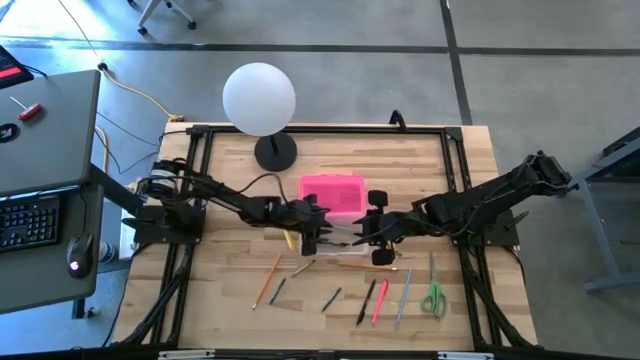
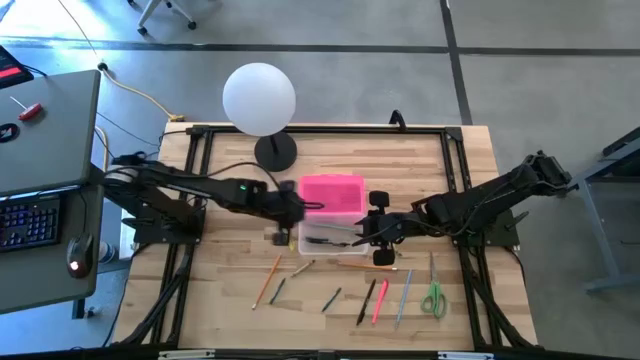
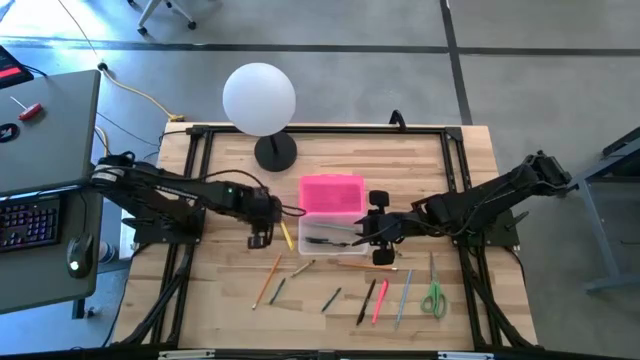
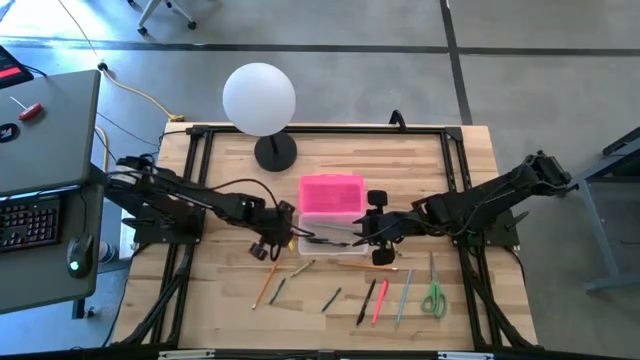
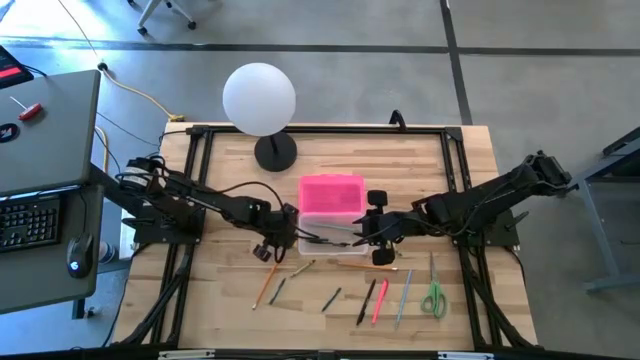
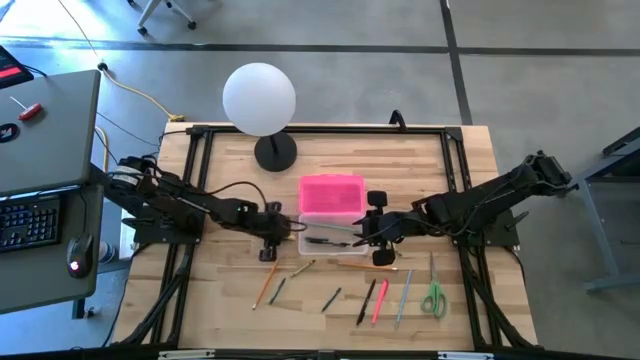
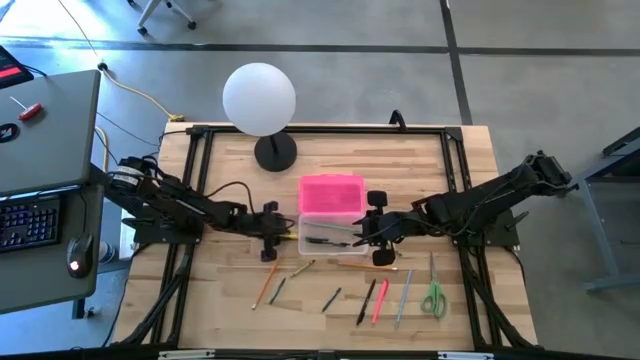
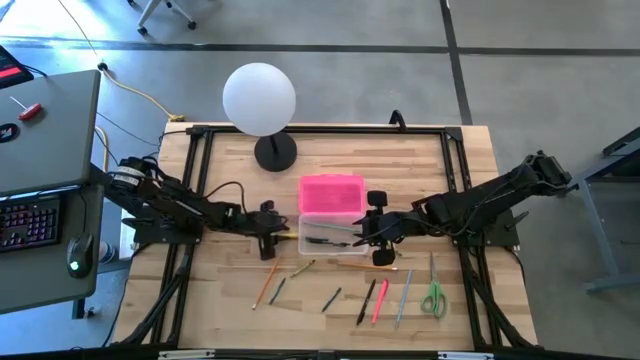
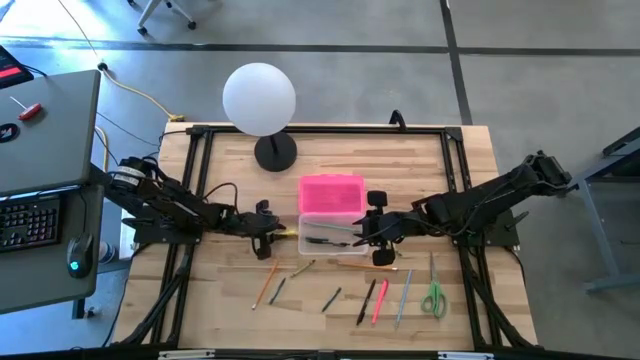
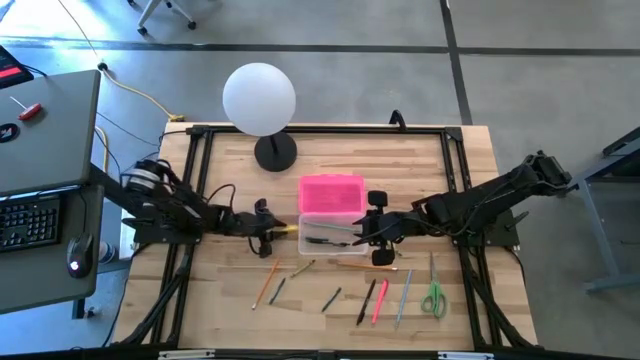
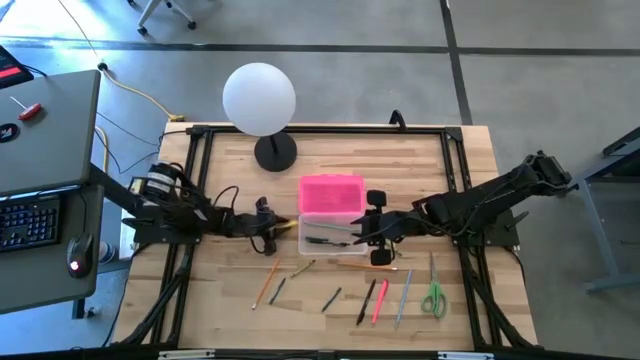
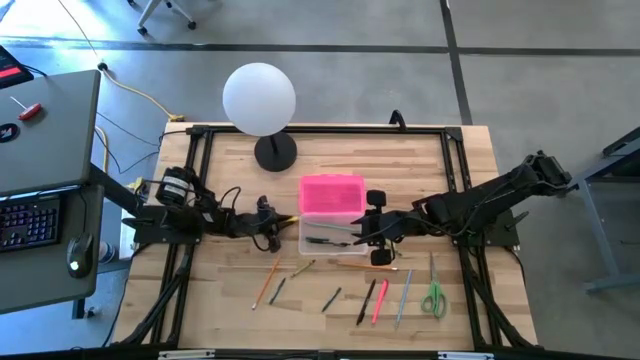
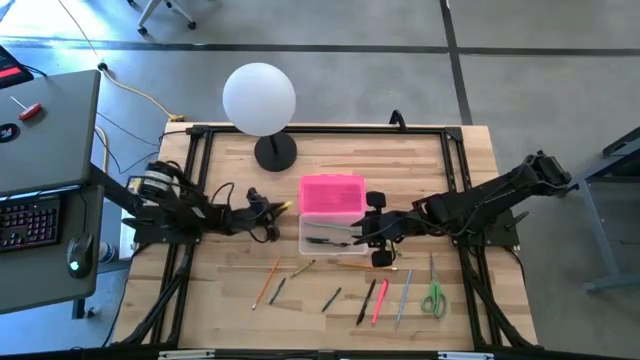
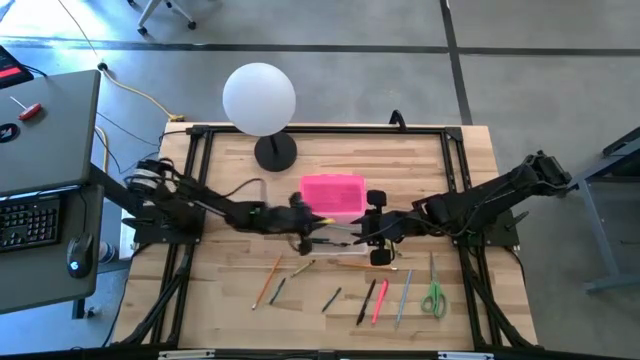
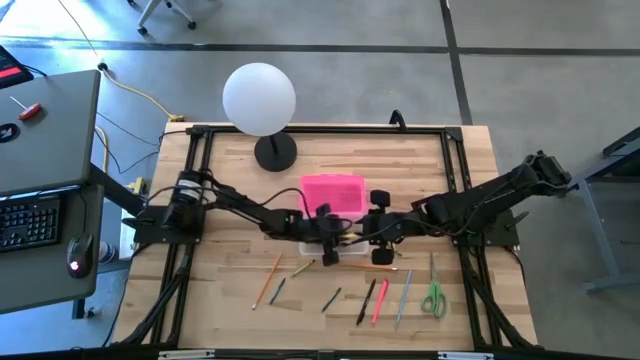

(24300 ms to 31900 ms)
Task: Pick & place school supplies into a supply box
Put the yellow pen into the pink supply box

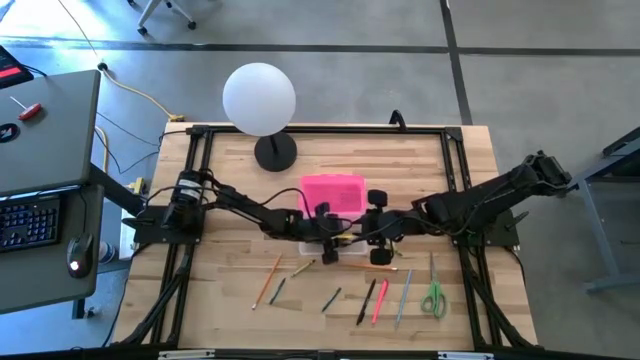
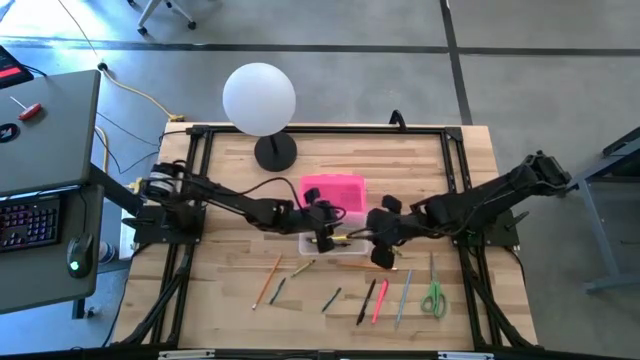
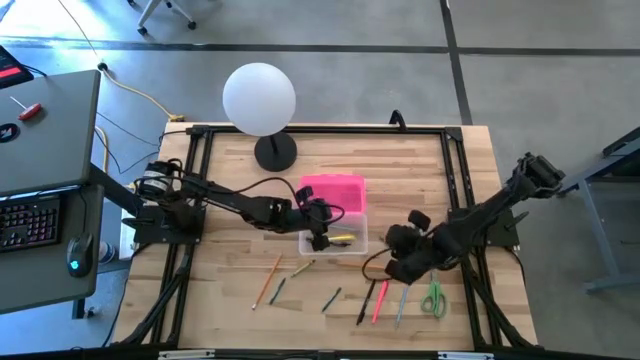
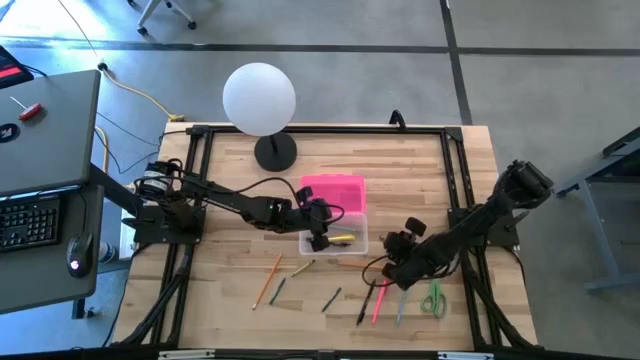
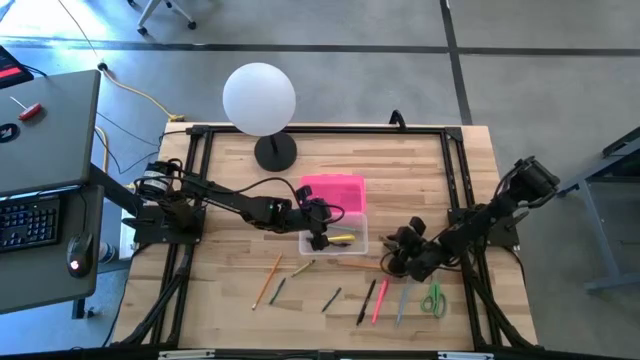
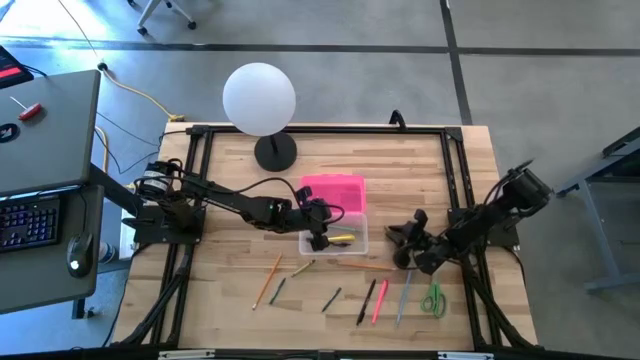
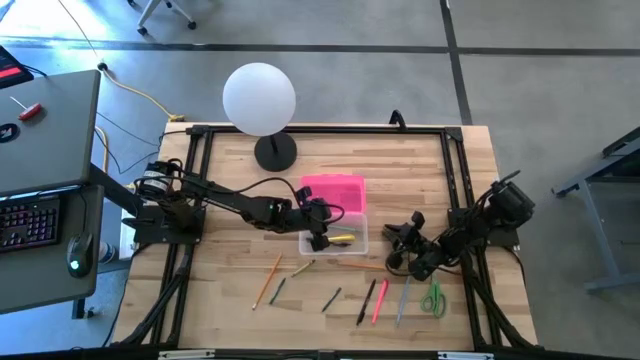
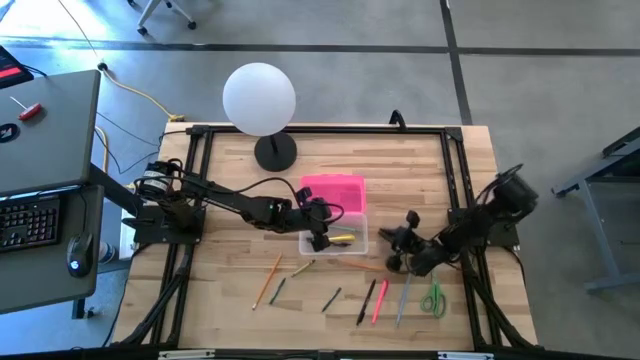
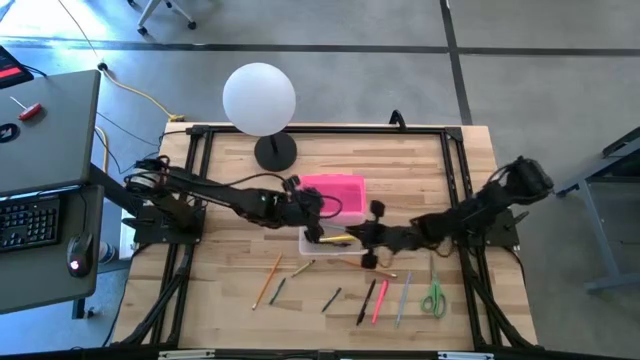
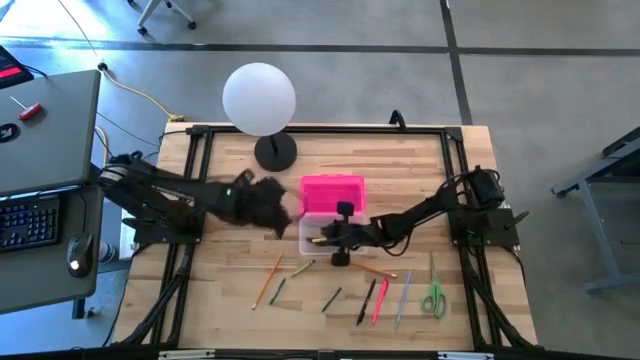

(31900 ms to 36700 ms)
Put the light green crayon into the pink supply box

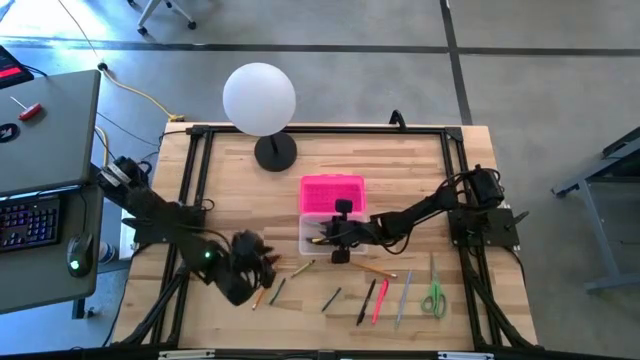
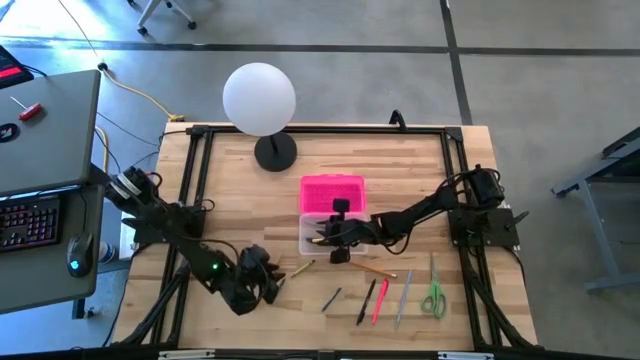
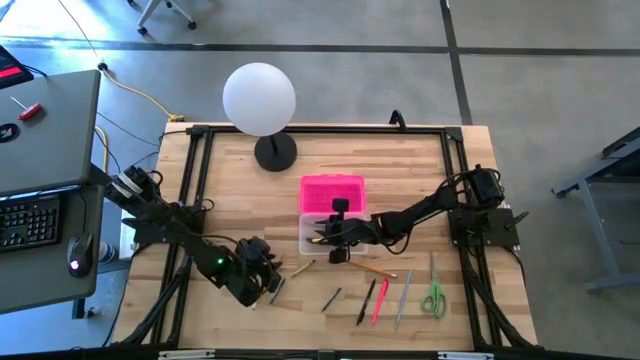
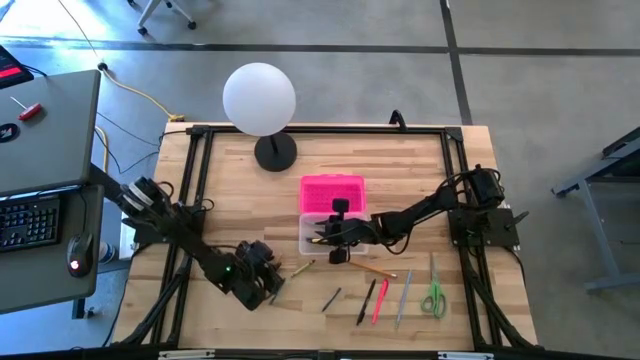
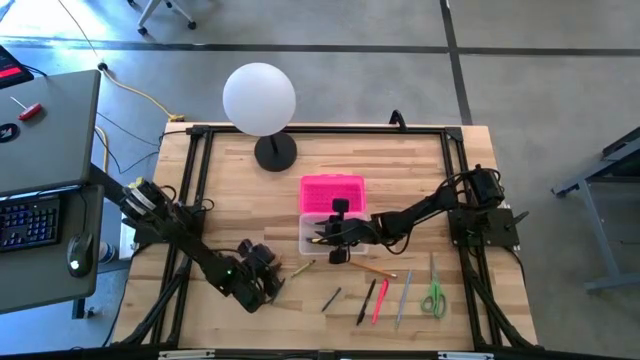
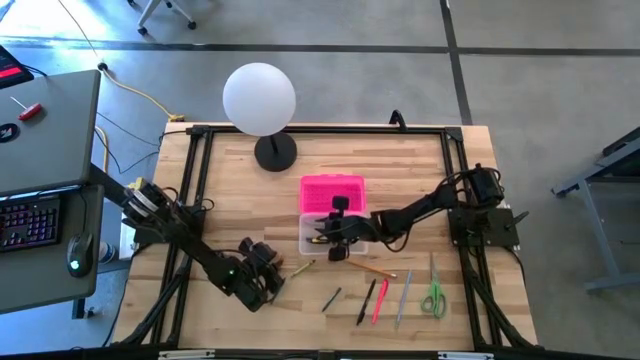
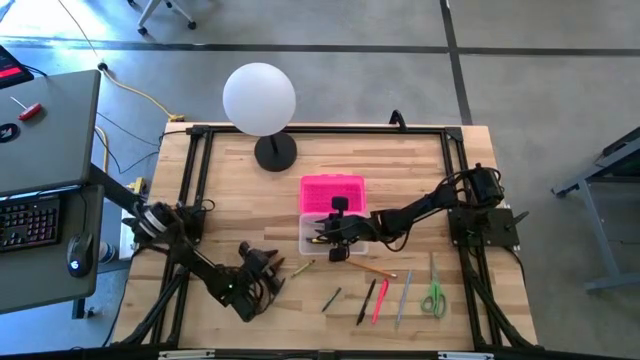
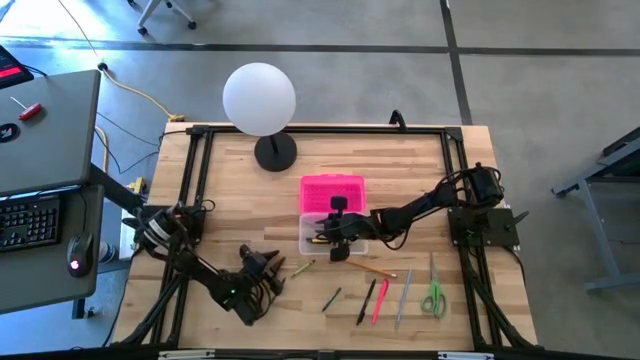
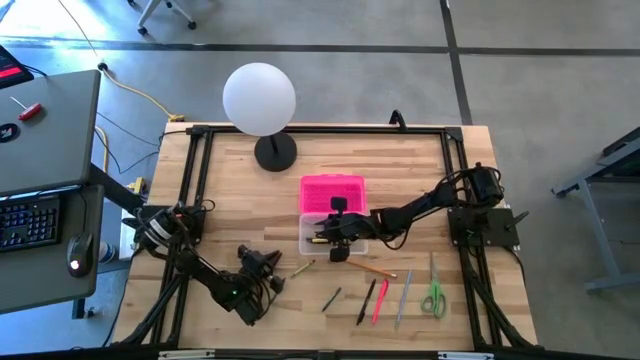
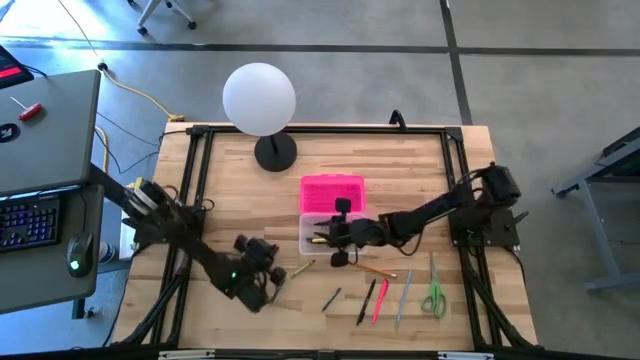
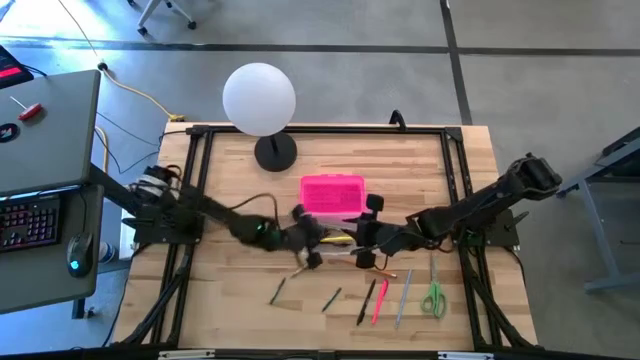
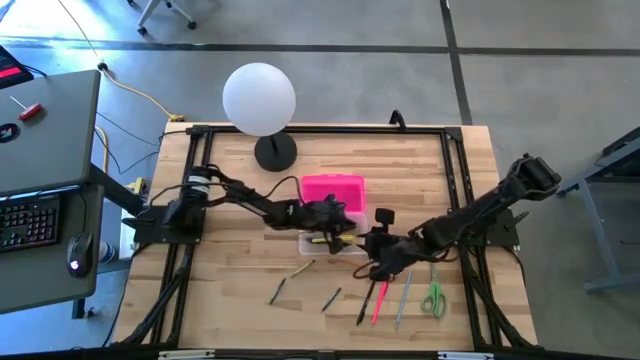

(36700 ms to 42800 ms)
Put the orange pencil into the pink supply box

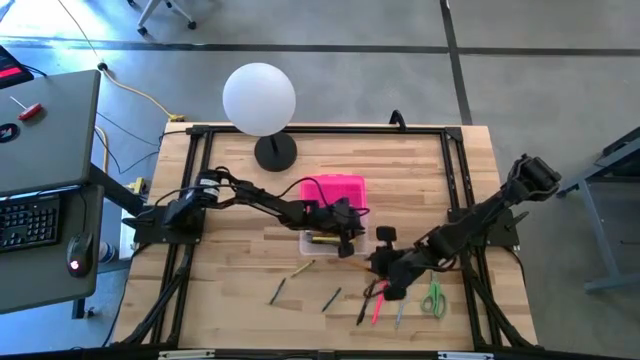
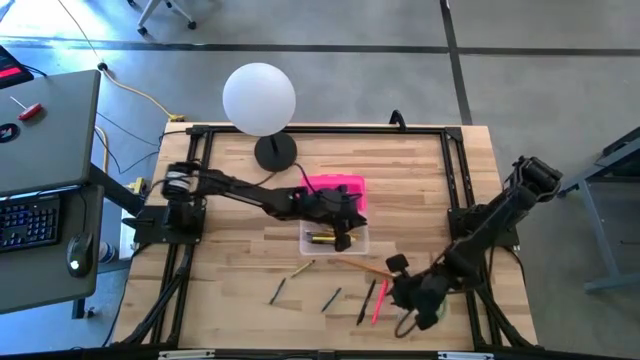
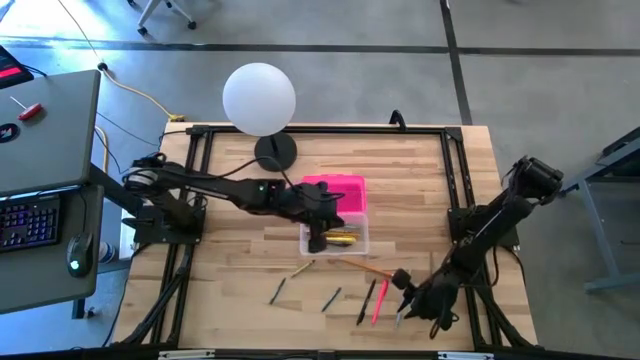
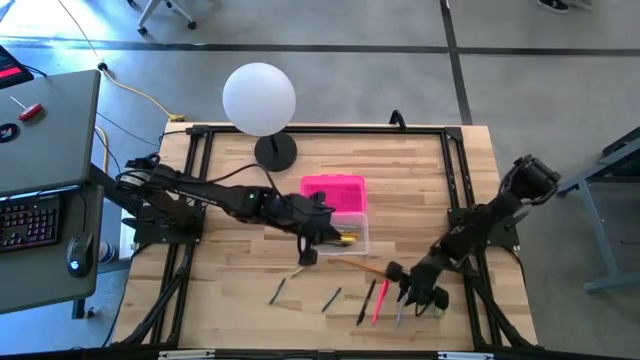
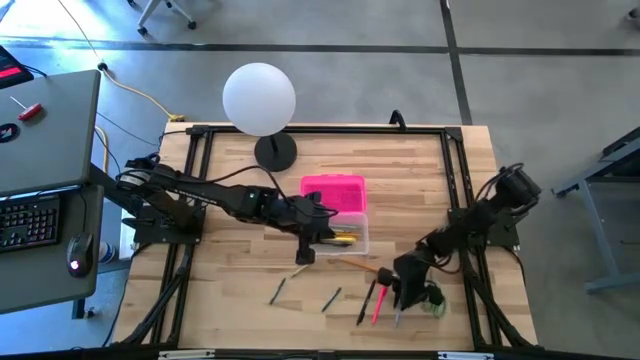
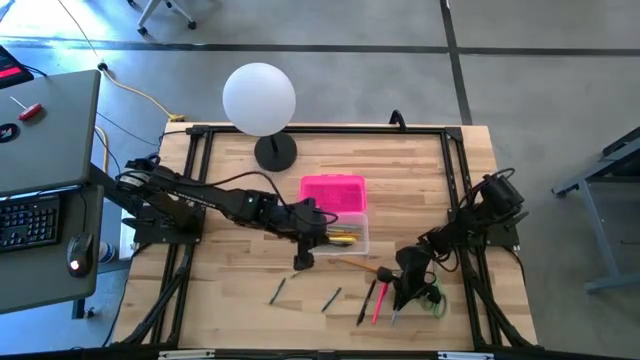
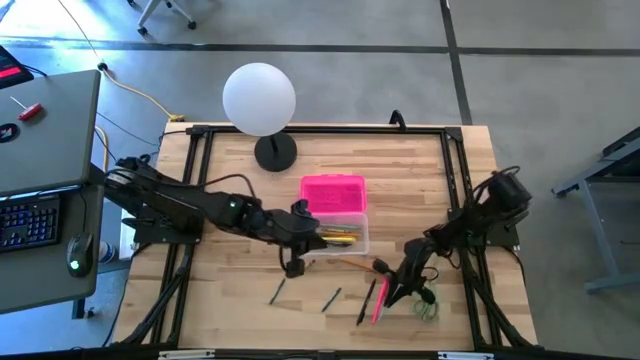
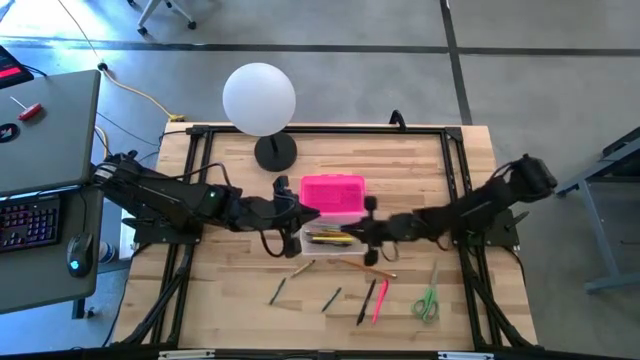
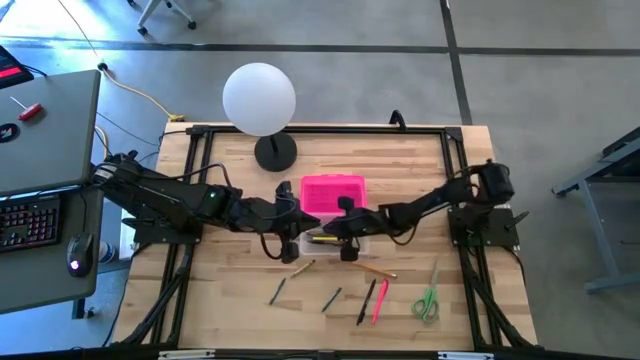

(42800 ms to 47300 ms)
Put the blue pencil into the pink supply box
